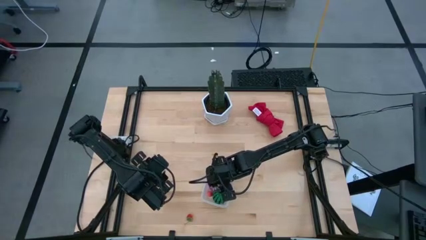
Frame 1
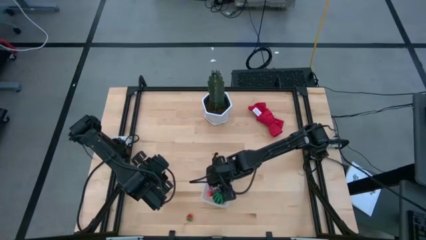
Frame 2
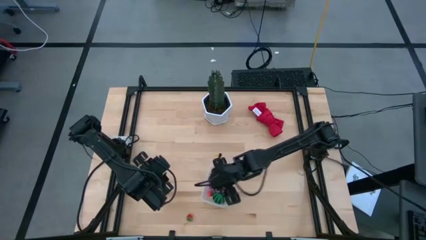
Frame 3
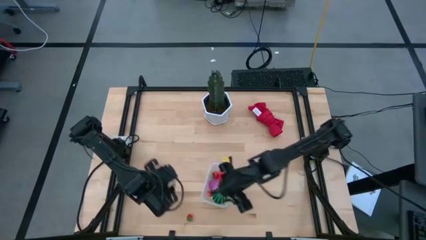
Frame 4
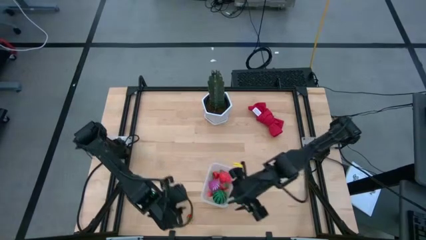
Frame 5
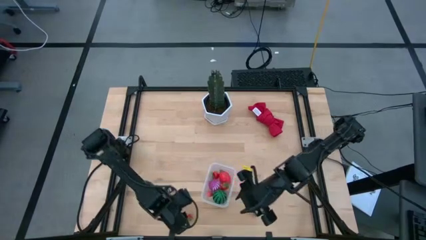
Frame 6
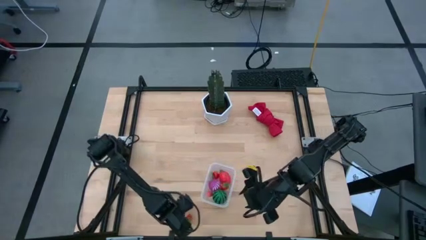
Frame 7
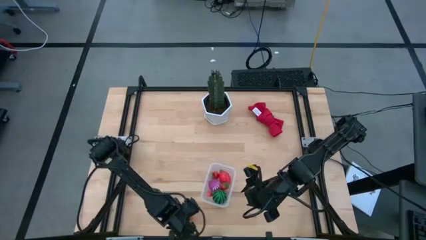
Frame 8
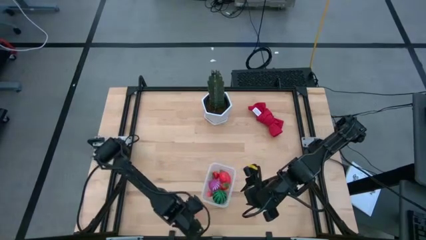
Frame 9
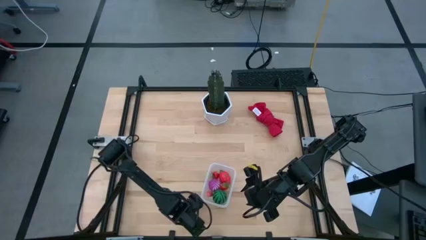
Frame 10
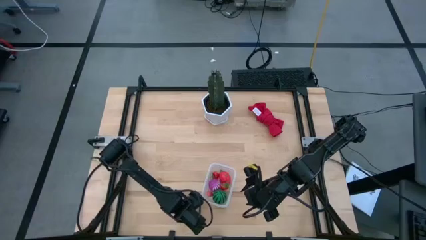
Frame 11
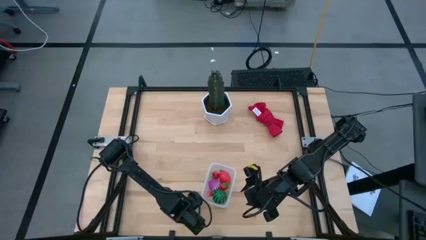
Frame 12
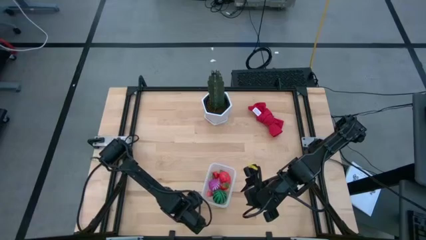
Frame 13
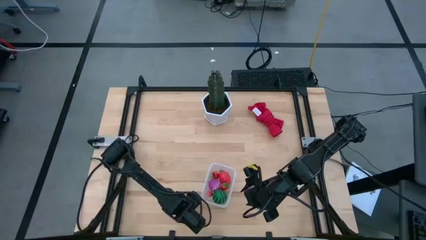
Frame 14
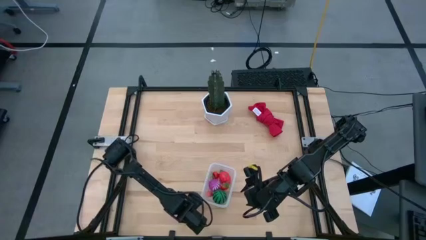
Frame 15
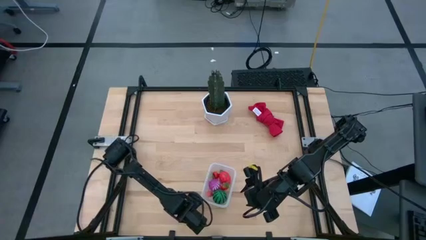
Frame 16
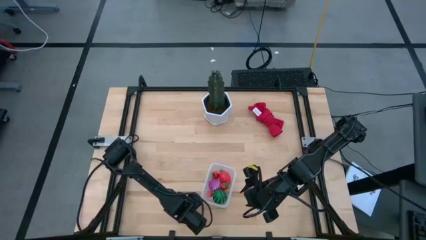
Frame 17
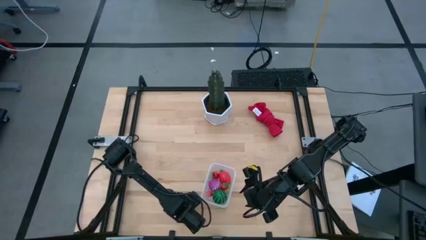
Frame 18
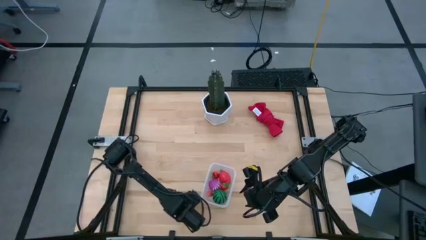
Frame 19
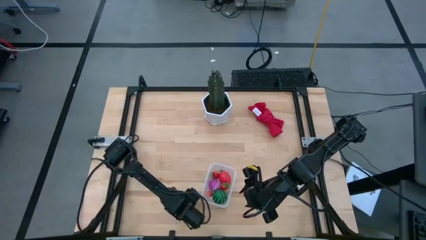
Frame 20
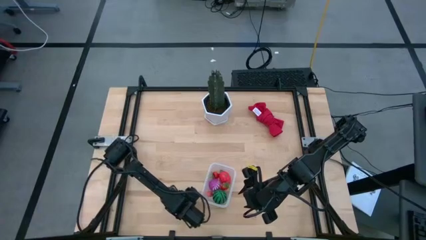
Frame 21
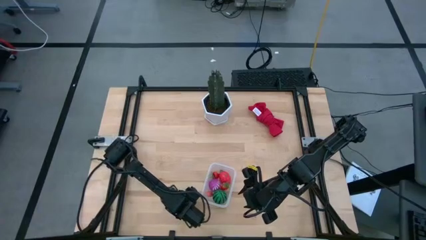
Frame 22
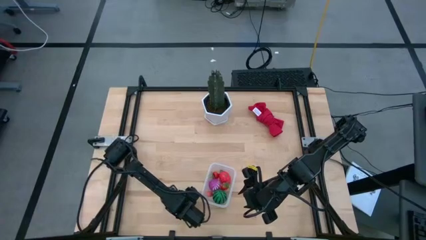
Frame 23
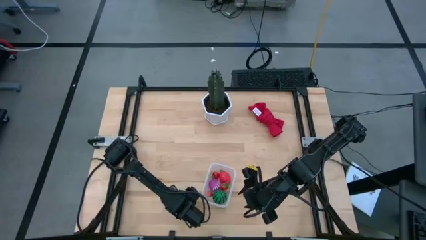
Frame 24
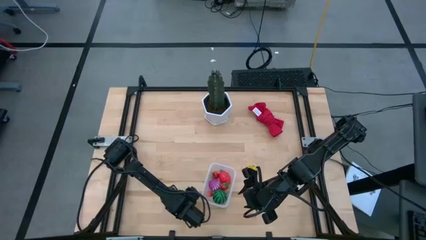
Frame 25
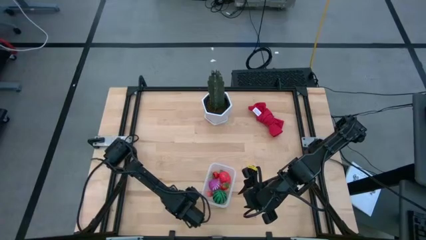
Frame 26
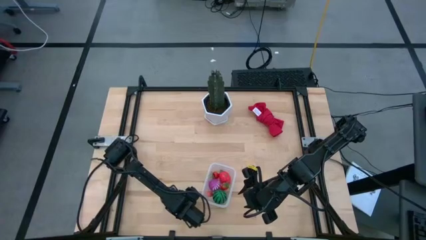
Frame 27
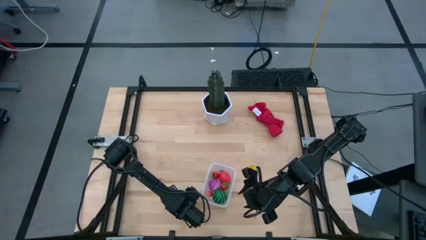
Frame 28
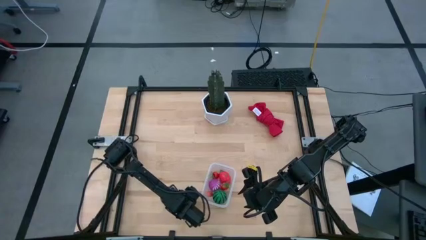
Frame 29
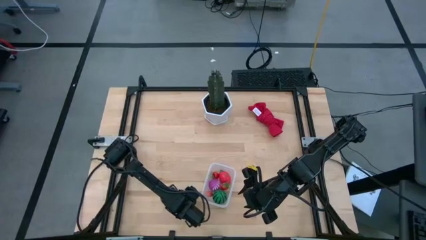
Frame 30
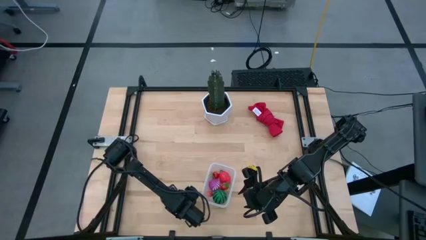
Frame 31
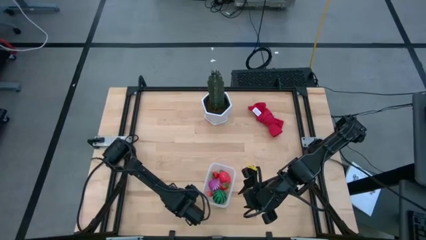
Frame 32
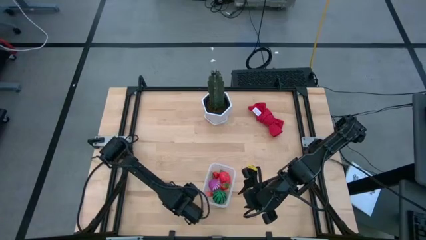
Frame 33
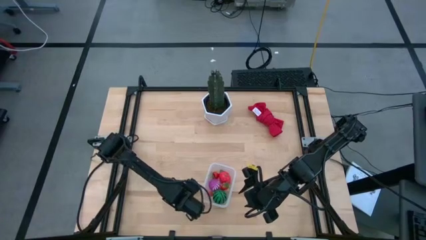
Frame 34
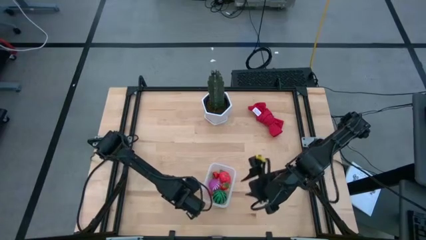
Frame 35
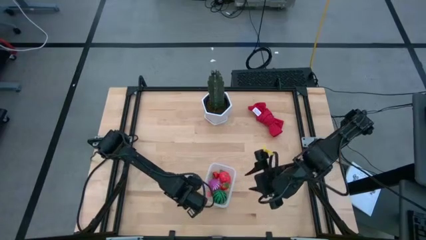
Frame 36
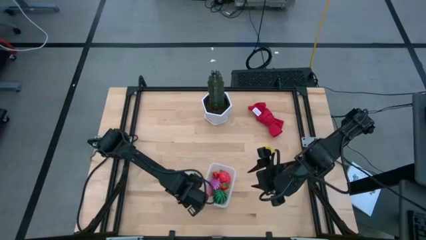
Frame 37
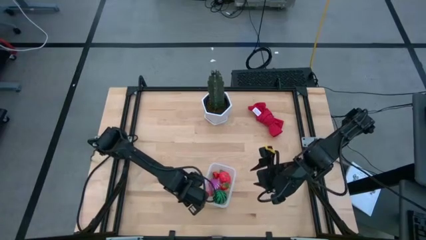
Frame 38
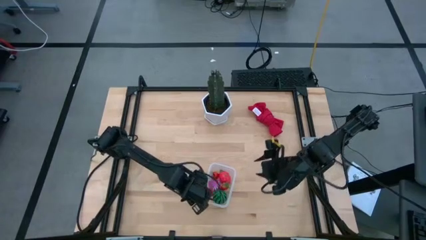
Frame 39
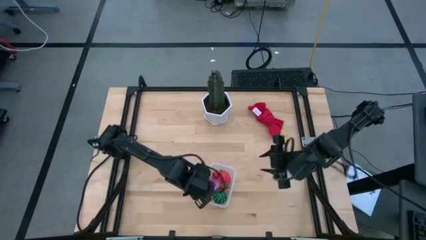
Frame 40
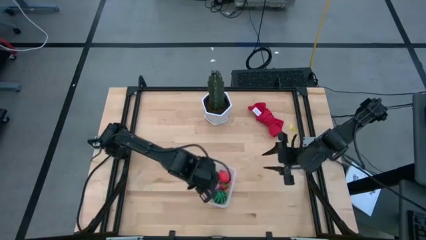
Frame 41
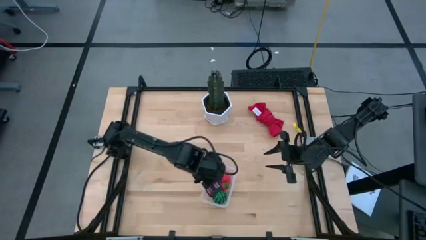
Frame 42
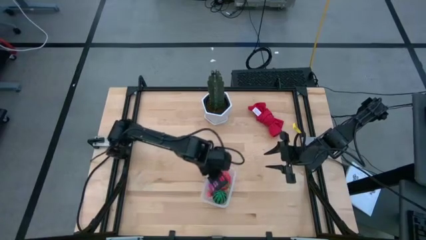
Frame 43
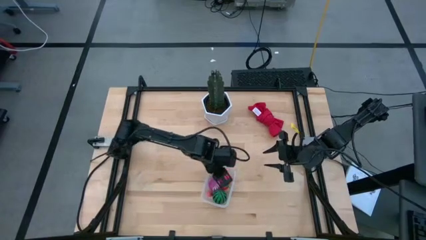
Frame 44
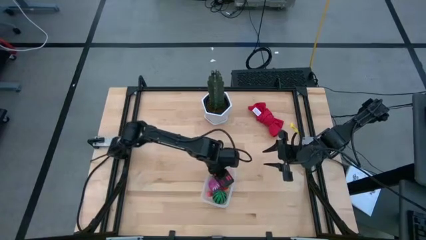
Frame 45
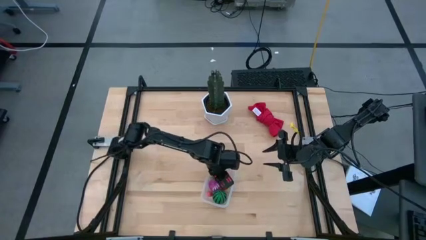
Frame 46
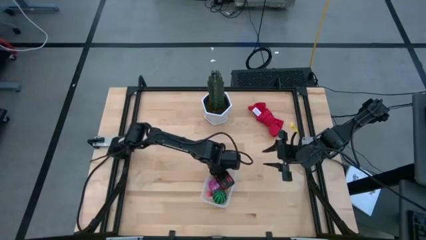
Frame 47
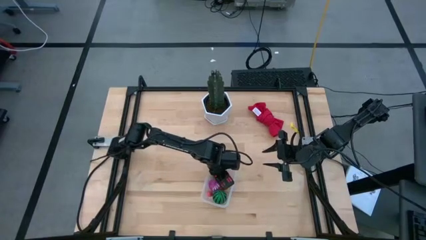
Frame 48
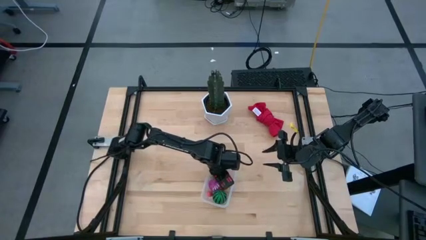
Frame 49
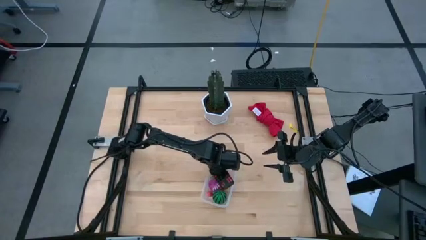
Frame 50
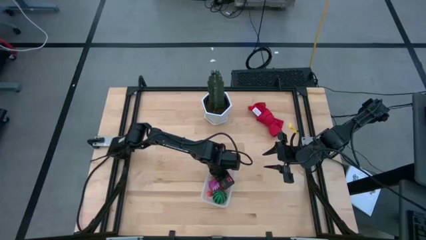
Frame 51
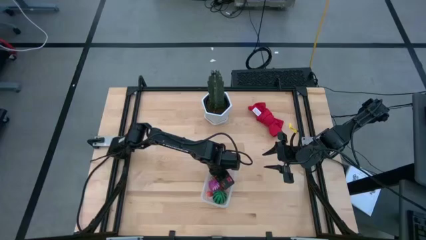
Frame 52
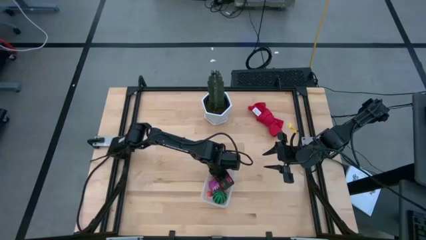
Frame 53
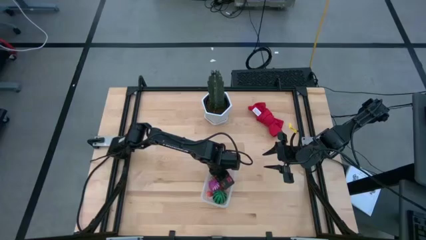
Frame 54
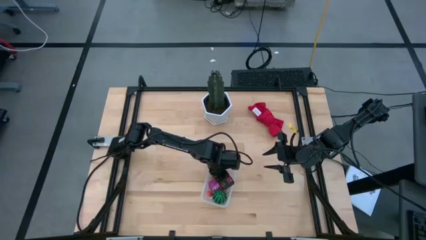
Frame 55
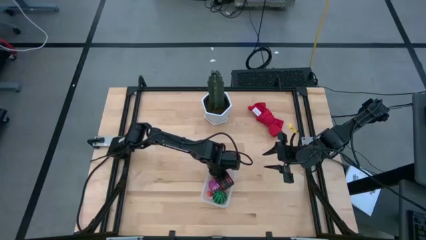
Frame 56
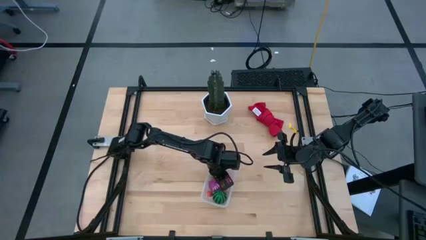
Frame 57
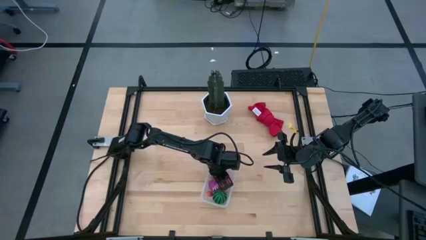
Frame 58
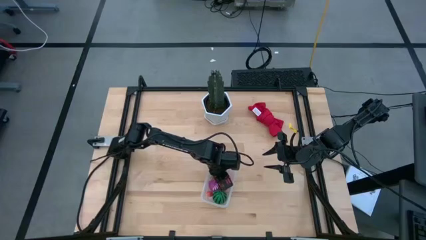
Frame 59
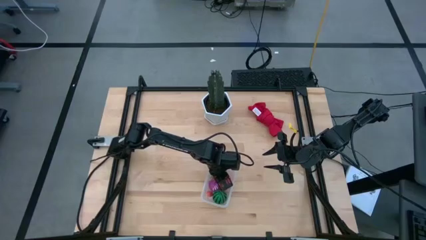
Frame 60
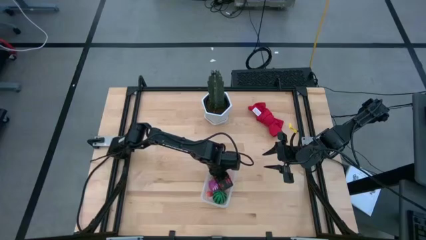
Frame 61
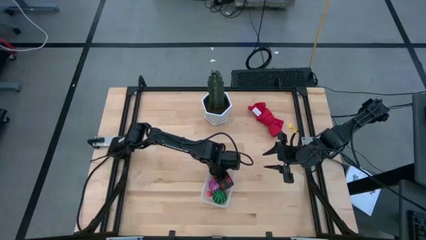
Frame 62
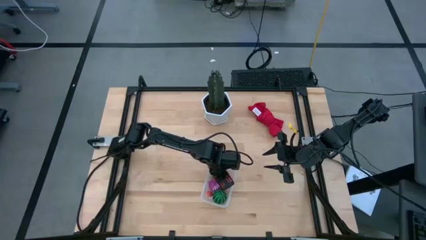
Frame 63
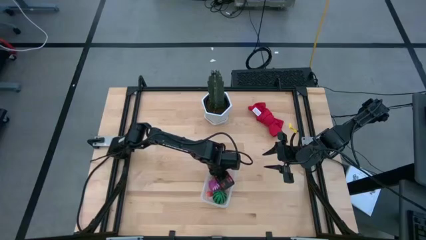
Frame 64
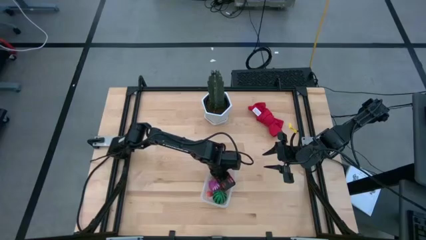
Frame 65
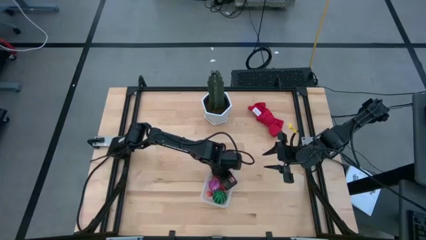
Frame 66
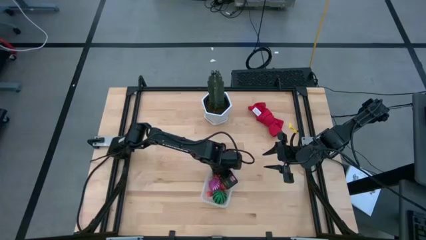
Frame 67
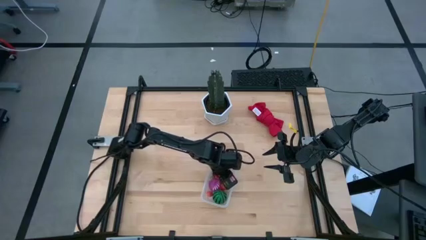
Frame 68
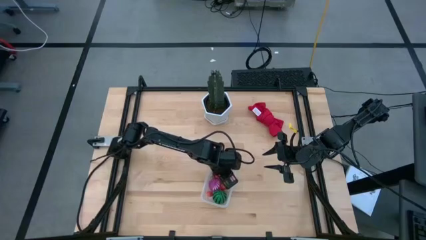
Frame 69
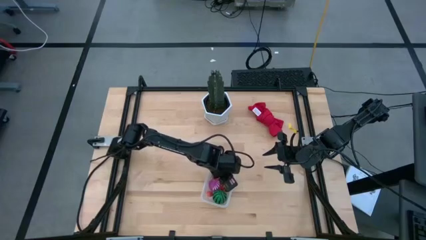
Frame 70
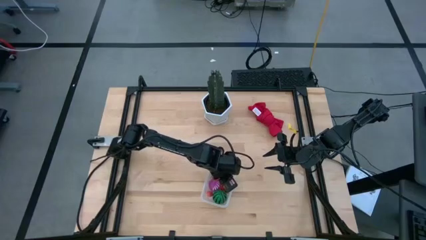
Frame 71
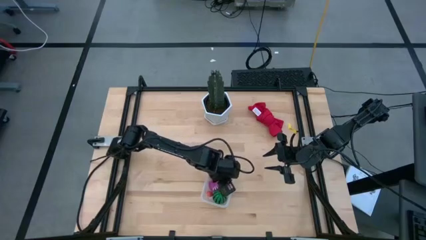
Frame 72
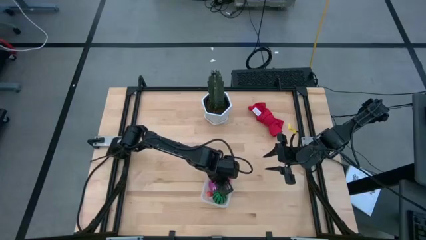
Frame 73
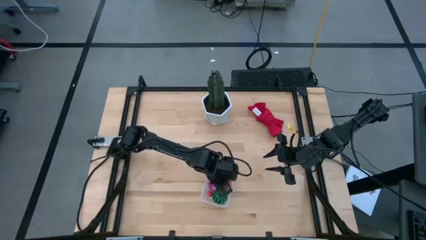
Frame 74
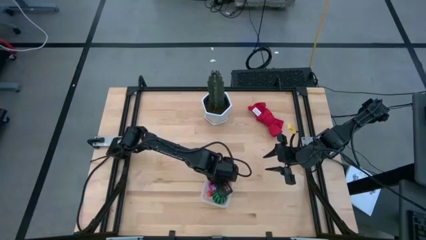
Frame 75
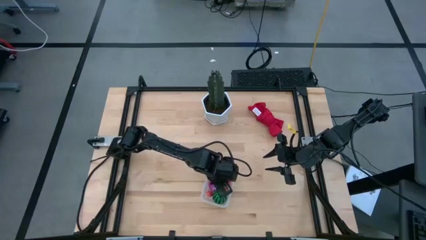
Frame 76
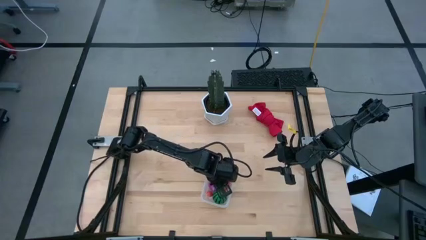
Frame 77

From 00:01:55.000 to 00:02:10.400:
Task: Pick and placing Produce into tupperware
Put the red strawberry into the transparent bin

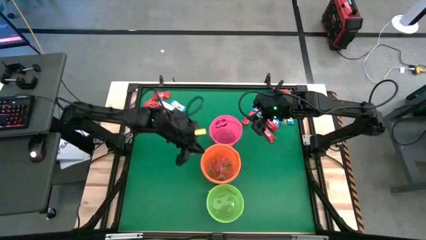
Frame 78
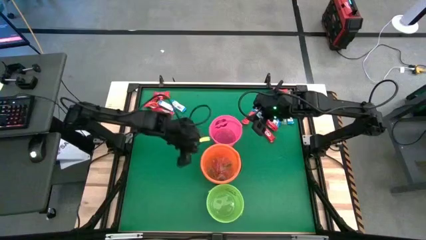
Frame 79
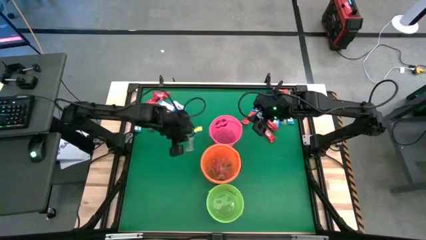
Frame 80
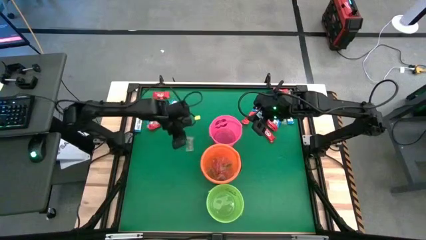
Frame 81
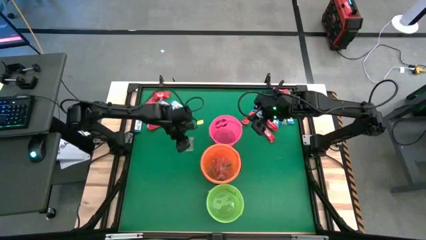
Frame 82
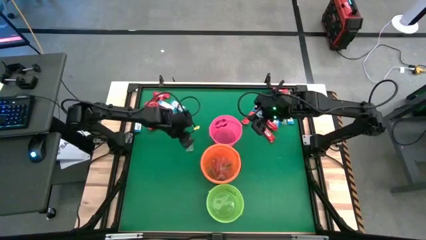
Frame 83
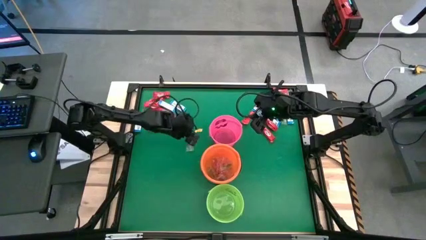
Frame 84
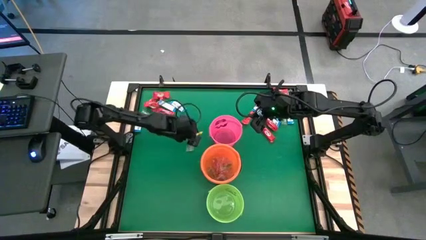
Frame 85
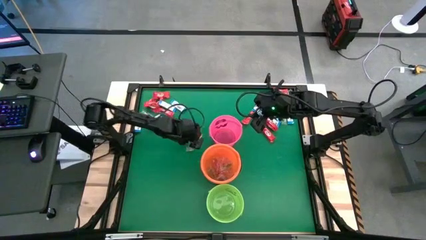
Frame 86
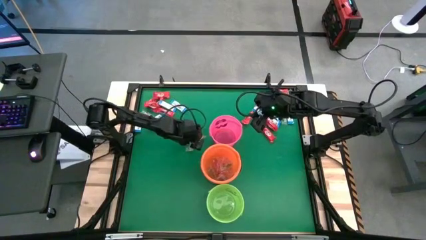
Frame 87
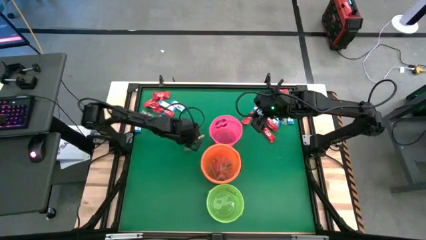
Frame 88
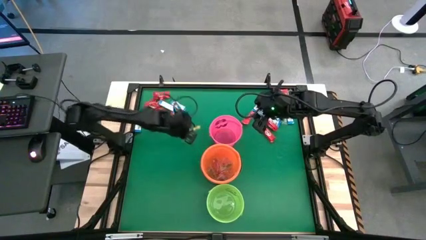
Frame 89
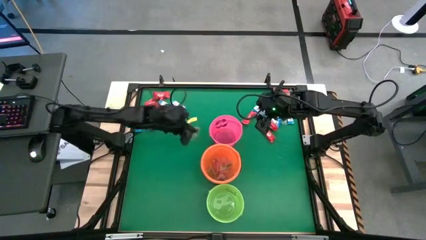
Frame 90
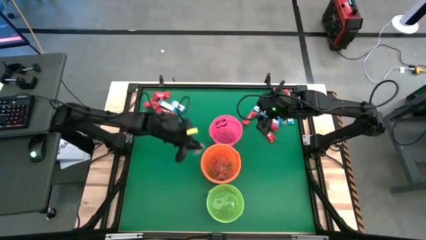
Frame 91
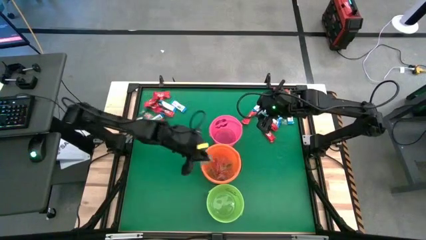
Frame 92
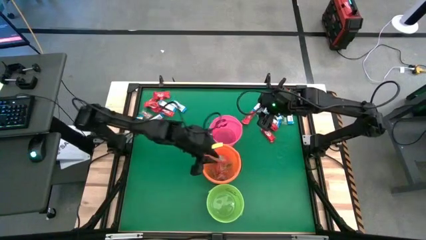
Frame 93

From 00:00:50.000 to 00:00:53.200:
Task: Sort candy by brand, put in halloween buckets
Put the green gummy into the orange bucket
